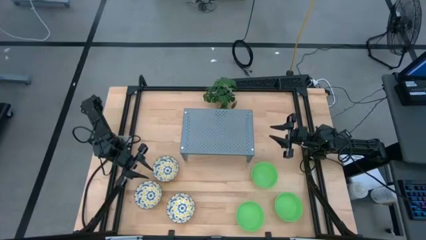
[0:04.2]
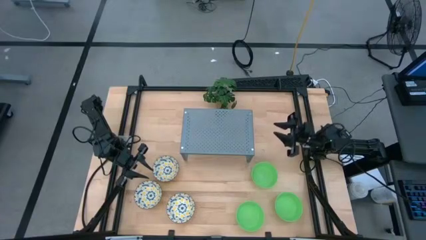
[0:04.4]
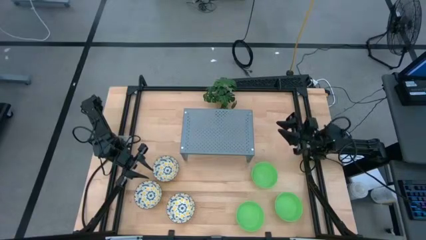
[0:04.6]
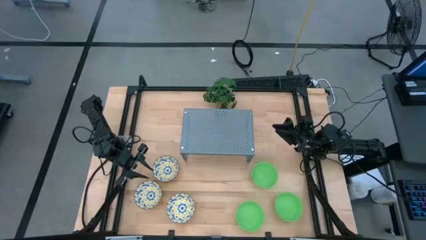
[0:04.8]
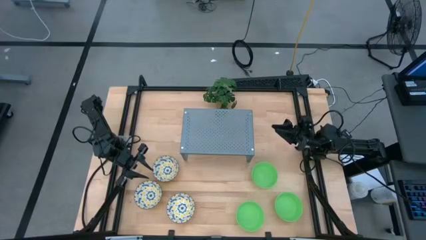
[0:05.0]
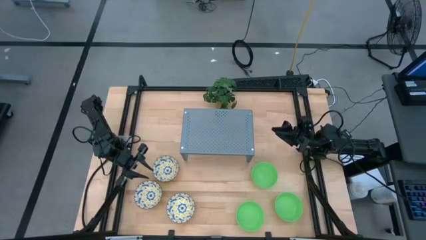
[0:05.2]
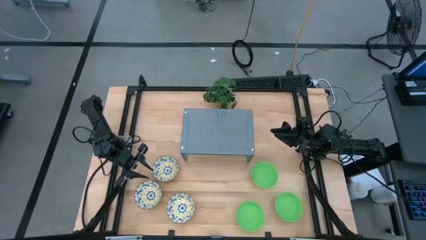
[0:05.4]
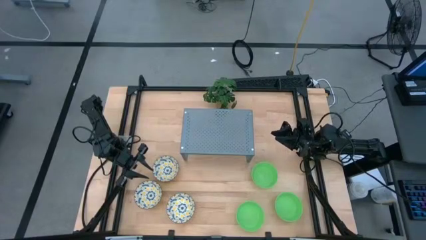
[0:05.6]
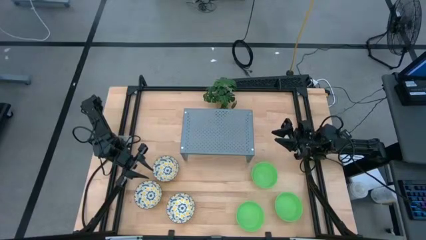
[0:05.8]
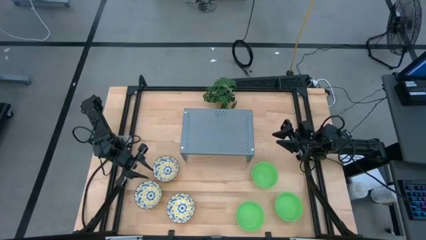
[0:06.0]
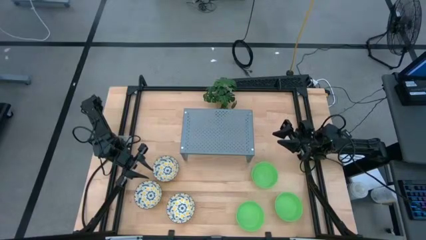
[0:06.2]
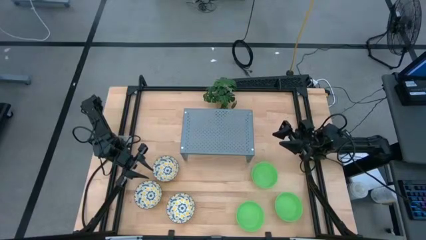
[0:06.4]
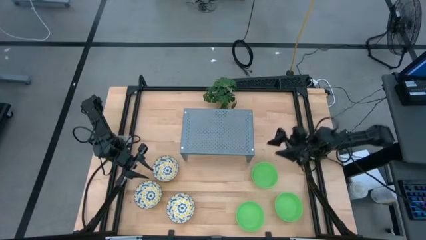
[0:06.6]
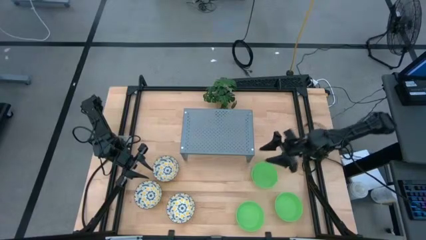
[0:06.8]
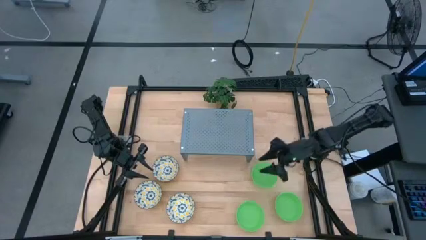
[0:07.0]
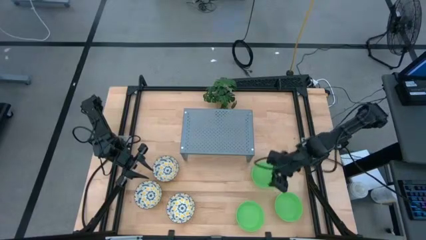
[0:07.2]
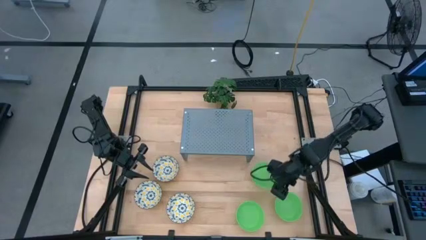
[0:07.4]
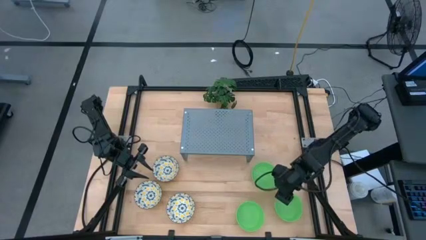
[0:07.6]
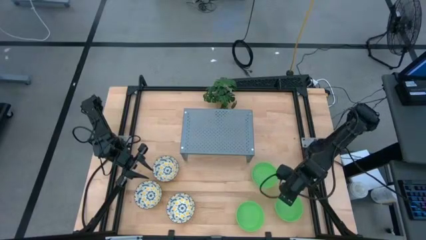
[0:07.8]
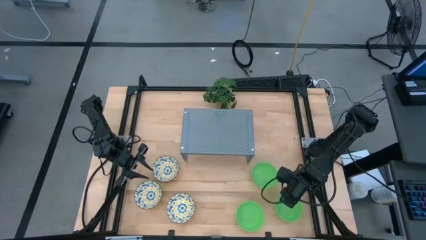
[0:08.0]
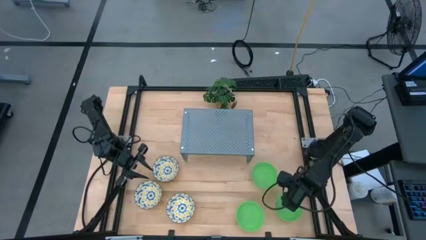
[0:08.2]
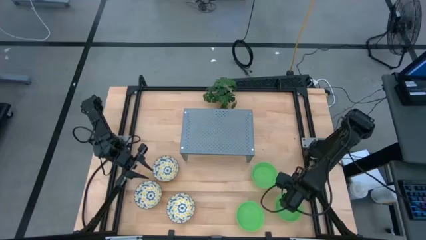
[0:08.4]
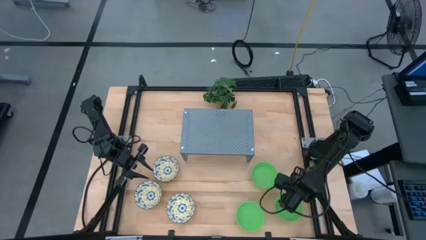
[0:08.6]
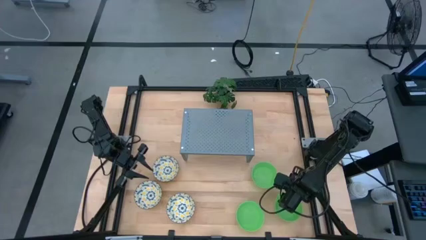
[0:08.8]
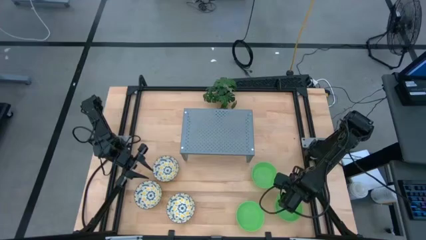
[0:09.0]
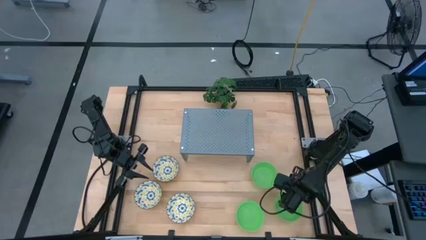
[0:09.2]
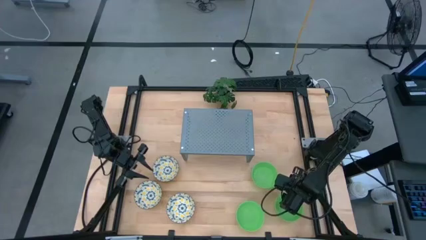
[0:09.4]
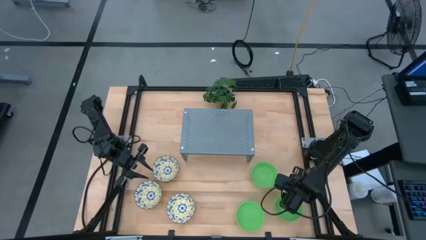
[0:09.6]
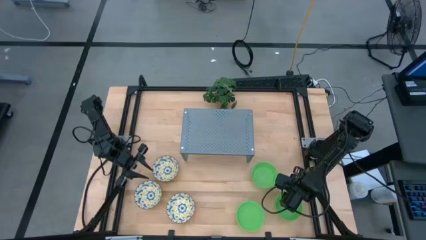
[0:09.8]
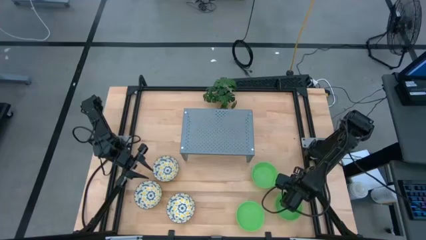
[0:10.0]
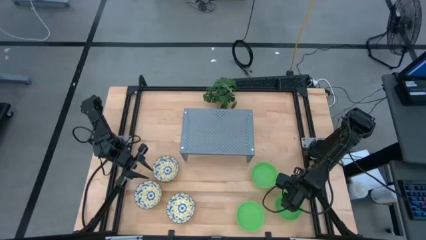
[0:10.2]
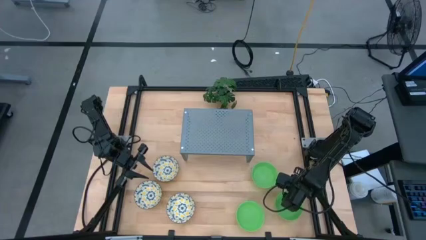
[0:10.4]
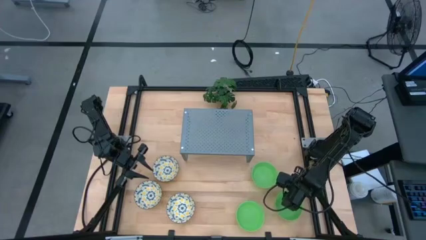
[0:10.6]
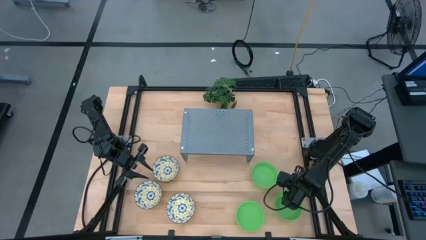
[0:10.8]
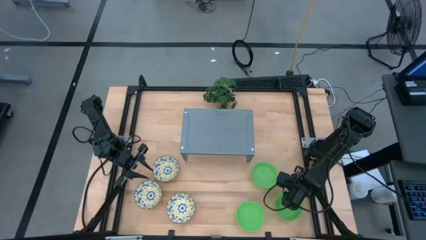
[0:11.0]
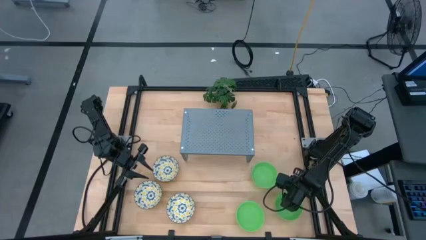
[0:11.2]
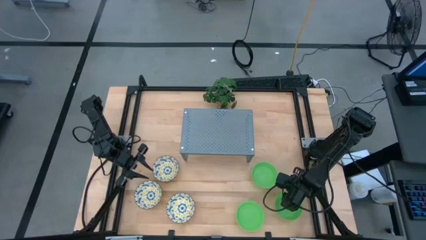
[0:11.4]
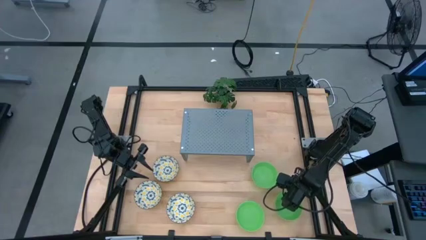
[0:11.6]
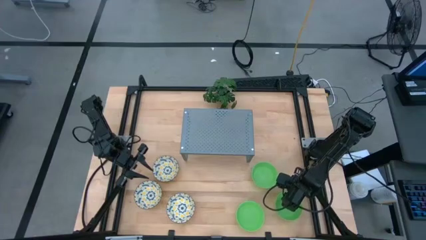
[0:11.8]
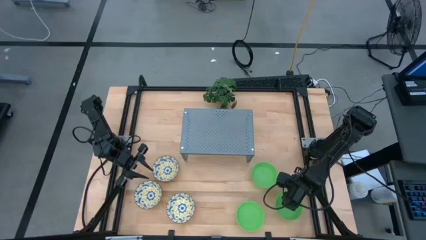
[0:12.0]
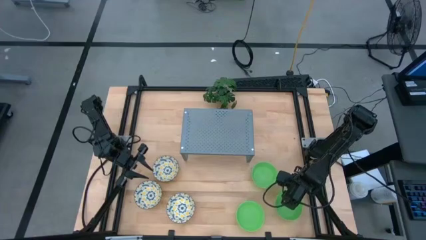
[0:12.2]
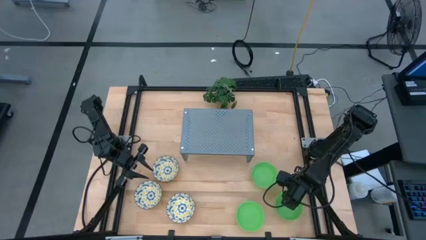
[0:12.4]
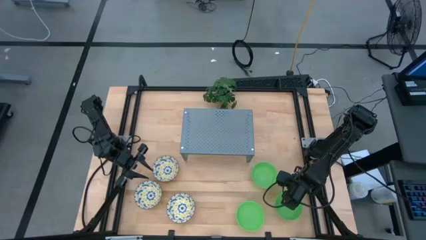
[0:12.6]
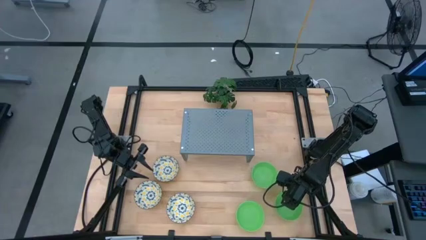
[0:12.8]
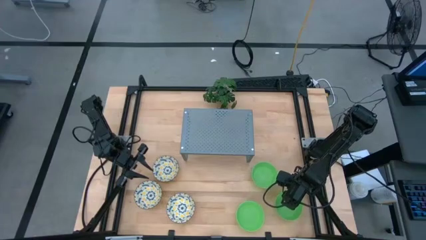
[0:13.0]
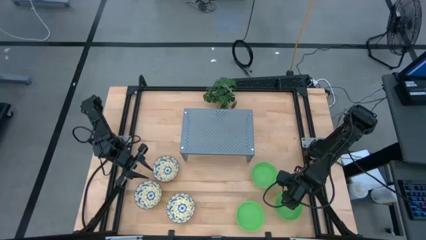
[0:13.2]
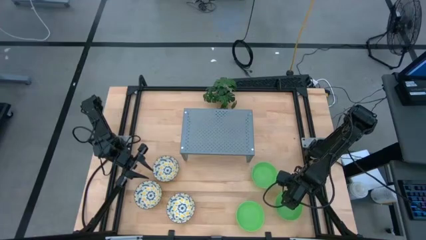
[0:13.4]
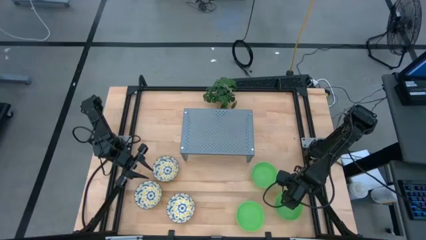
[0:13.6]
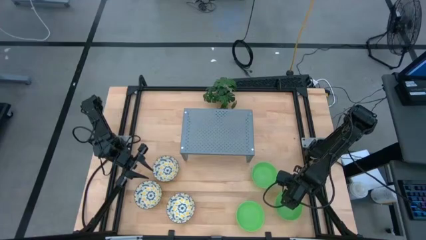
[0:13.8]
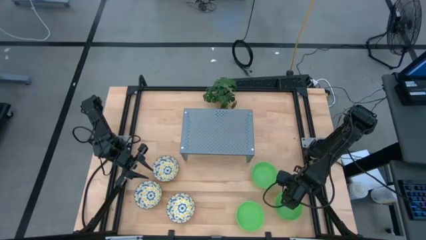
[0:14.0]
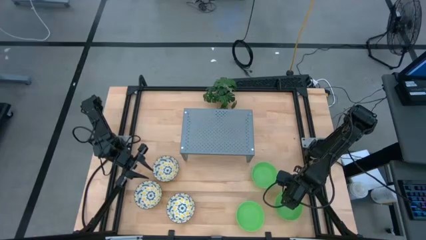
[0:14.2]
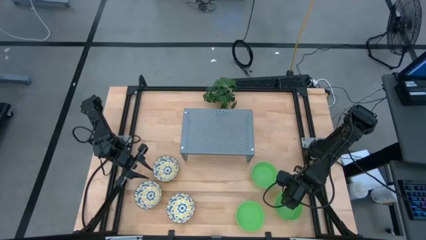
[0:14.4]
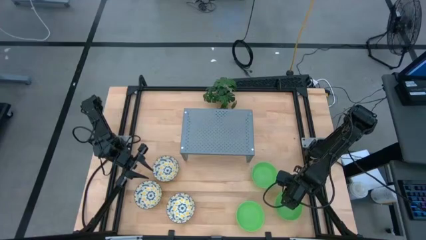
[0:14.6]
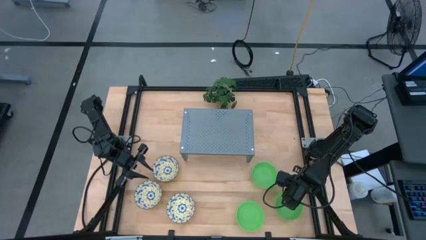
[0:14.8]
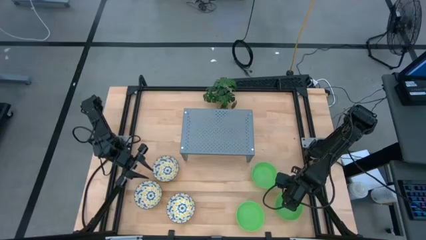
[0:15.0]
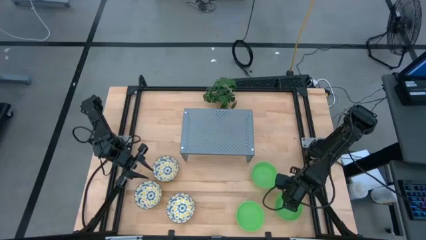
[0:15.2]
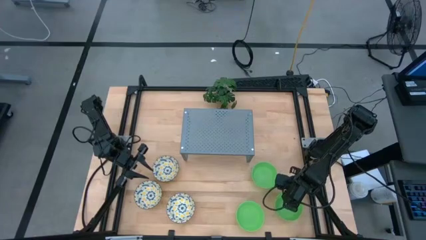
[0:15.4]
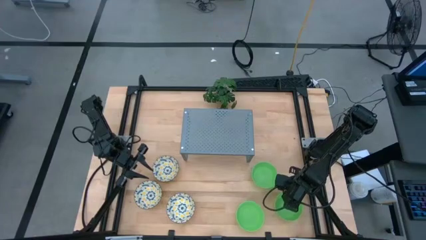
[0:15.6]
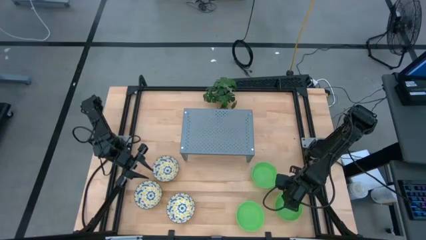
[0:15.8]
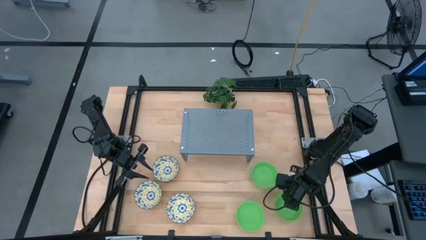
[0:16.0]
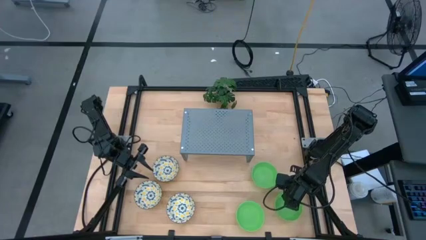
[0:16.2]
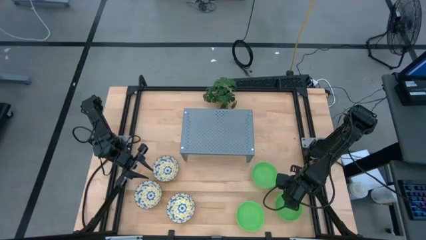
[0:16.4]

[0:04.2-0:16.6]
Task: Pick & Place Mini bowls
Put the bottom right green bowl on the shelf

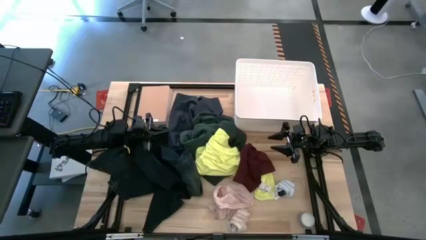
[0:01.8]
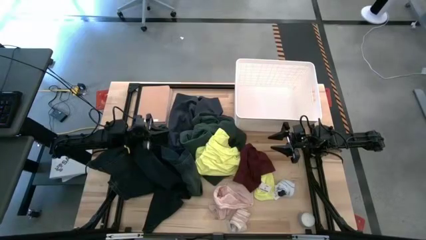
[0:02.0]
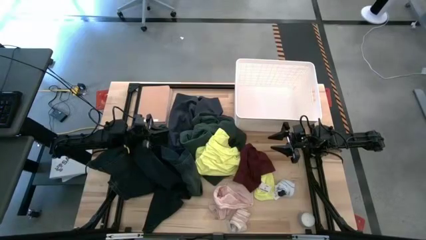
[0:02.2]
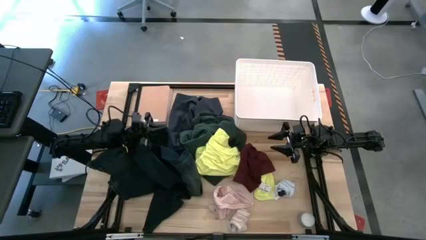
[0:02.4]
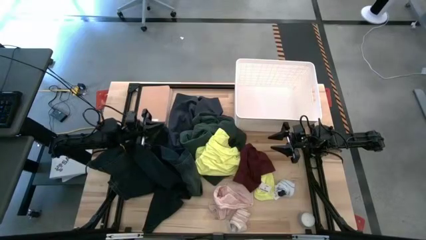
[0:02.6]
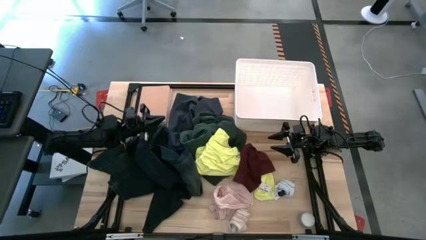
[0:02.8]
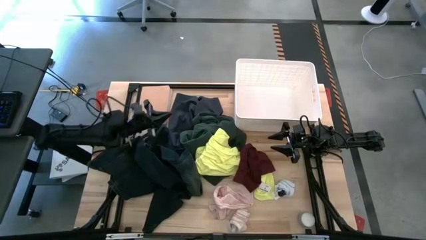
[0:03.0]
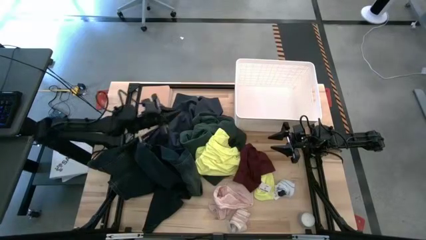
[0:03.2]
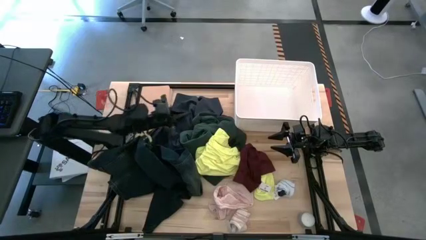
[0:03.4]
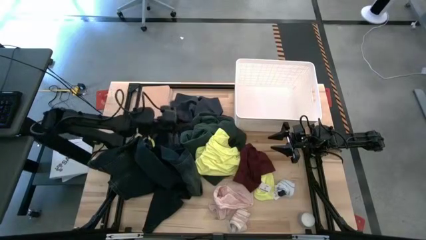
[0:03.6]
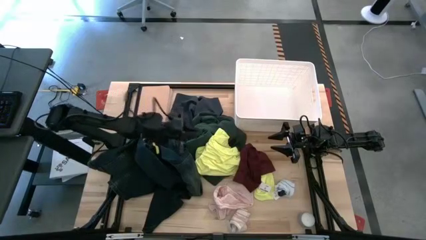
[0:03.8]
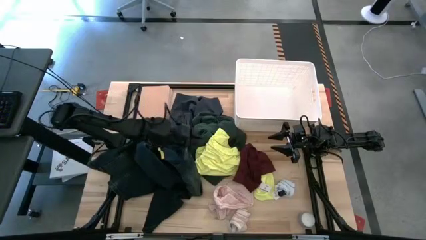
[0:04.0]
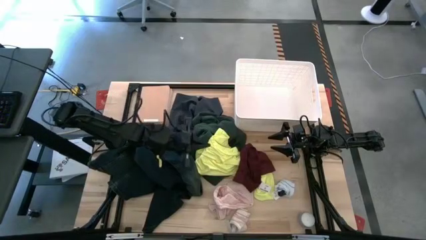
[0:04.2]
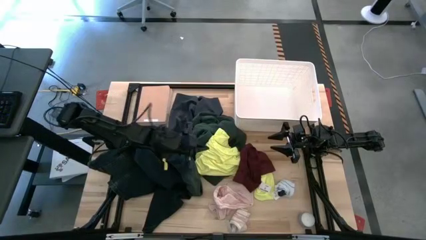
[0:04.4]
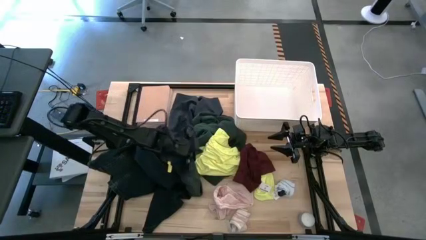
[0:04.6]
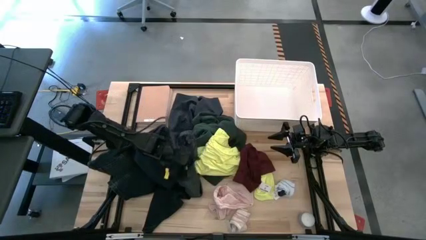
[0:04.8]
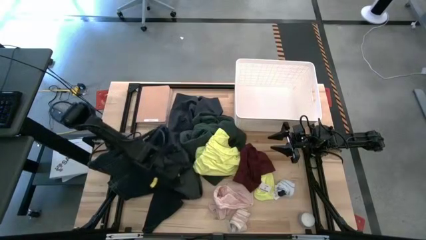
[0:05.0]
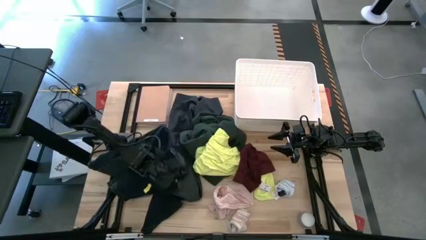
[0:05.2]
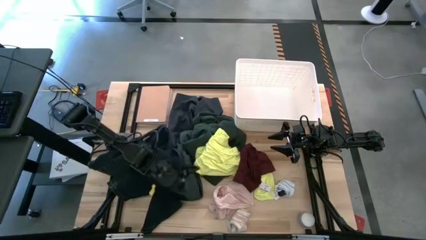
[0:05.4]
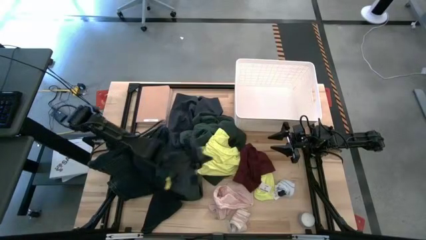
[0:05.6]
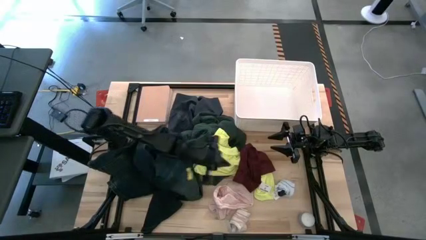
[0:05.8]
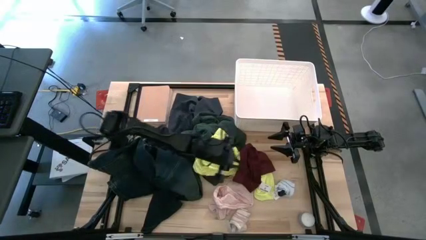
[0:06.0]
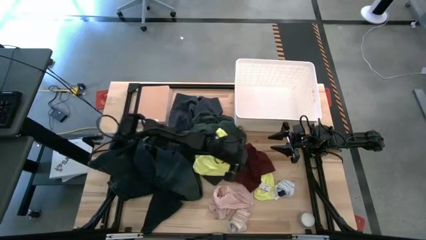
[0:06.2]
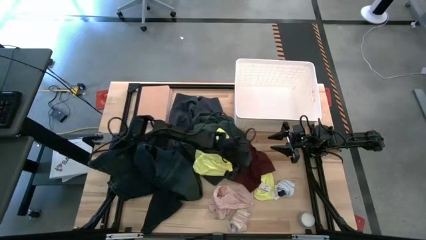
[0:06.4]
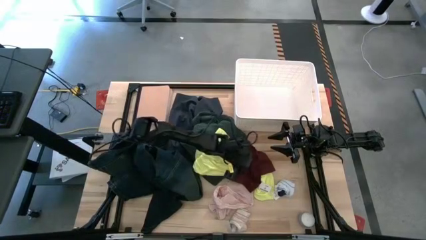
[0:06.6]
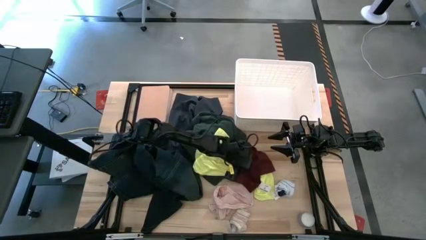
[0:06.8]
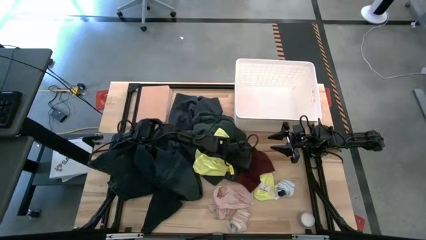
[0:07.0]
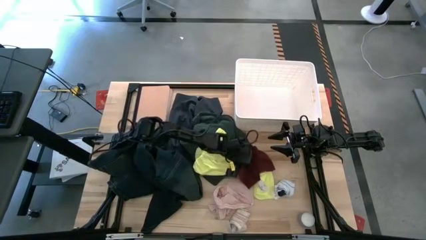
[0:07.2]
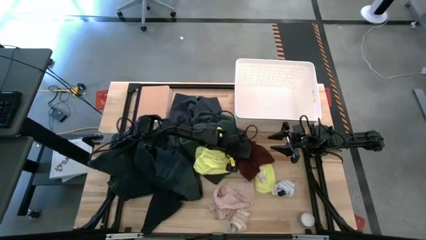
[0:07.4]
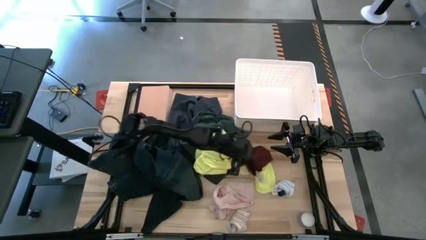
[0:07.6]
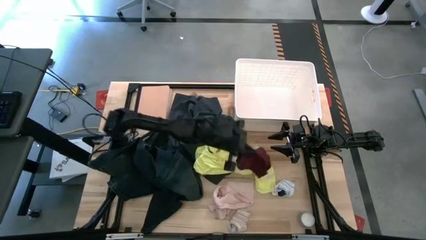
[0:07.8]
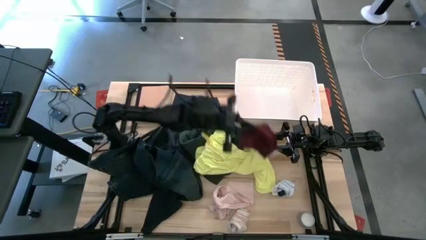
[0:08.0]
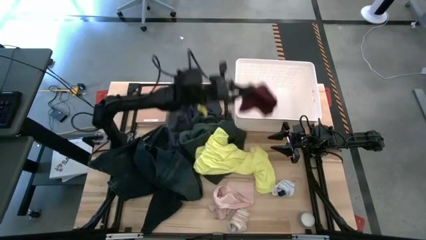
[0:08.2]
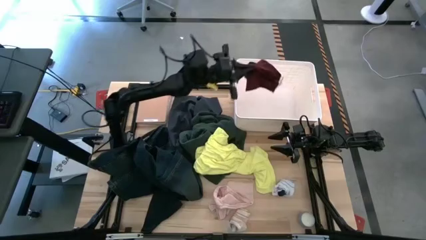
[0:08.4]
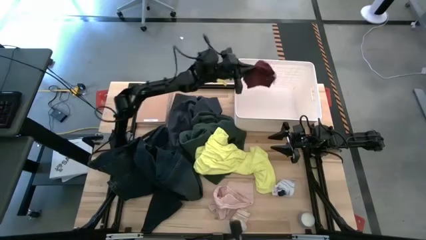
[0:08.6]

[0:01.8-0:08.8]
Task: Sort clothes
Put the red underwear into the white laundry bin
